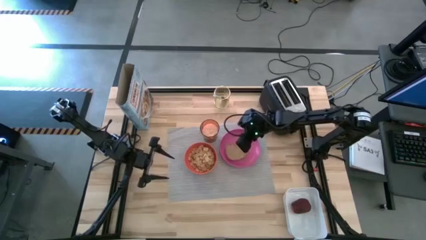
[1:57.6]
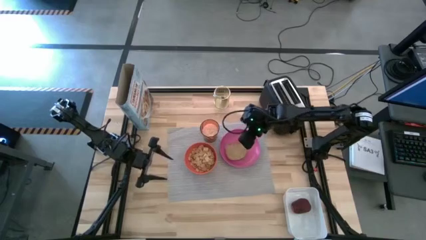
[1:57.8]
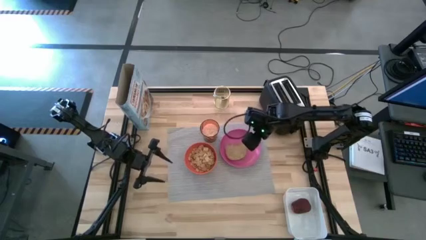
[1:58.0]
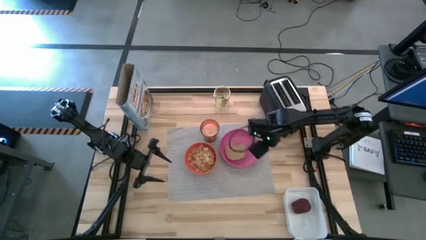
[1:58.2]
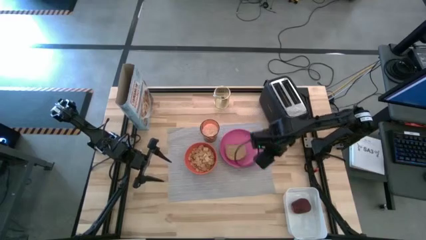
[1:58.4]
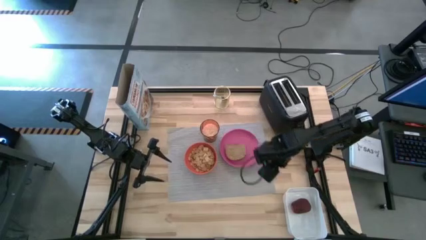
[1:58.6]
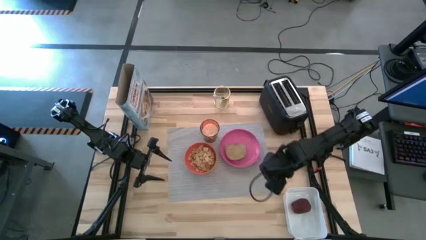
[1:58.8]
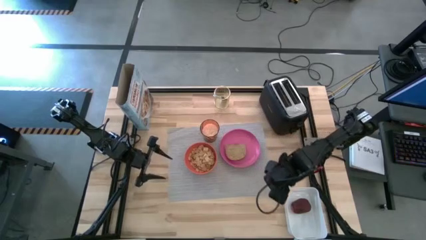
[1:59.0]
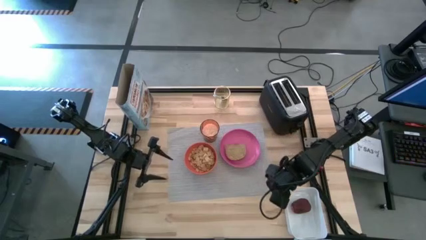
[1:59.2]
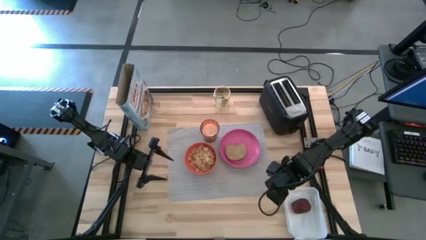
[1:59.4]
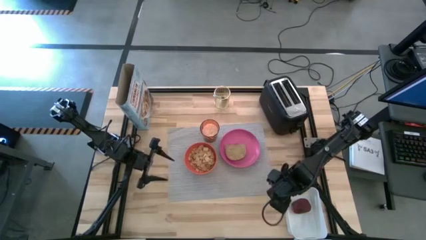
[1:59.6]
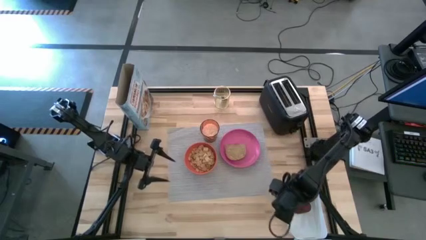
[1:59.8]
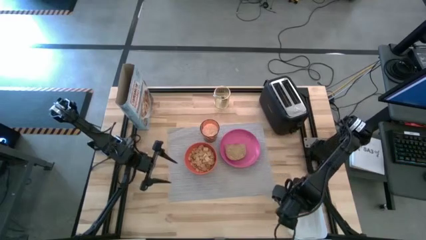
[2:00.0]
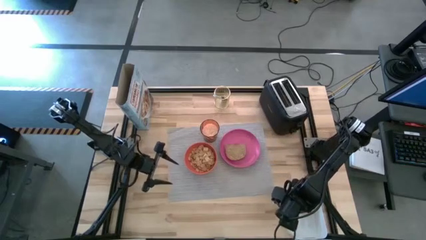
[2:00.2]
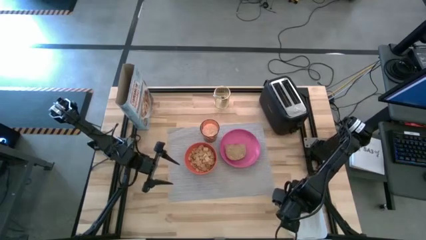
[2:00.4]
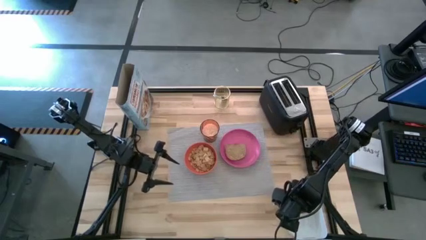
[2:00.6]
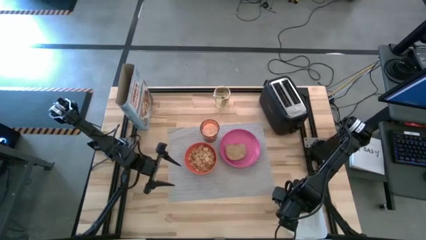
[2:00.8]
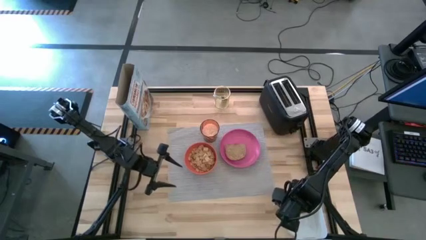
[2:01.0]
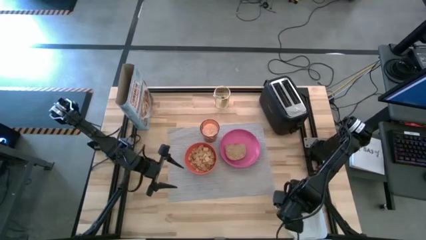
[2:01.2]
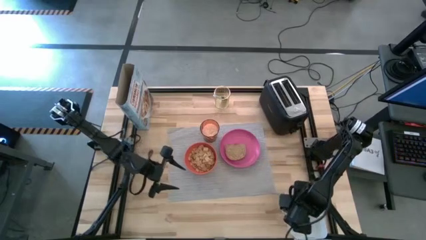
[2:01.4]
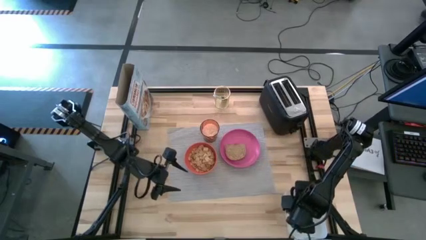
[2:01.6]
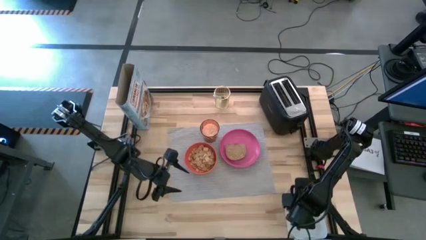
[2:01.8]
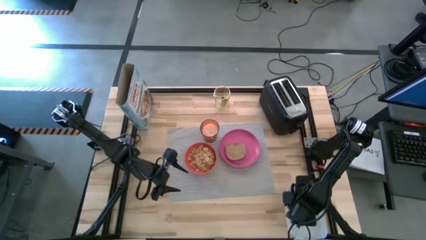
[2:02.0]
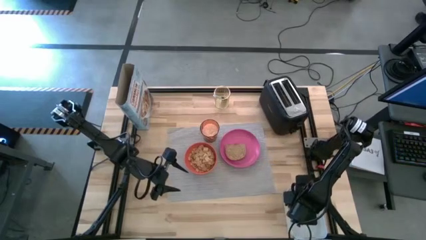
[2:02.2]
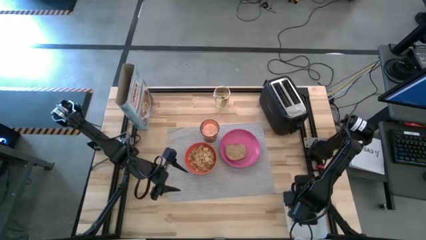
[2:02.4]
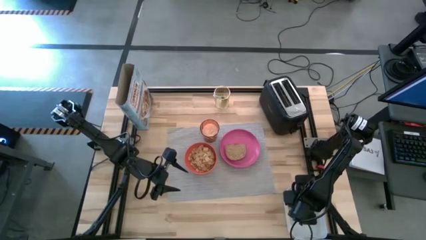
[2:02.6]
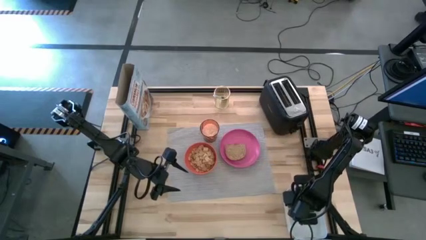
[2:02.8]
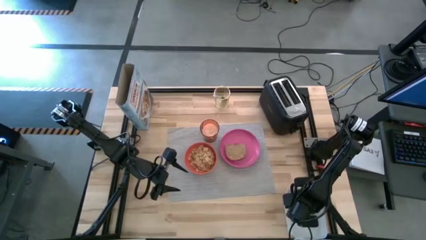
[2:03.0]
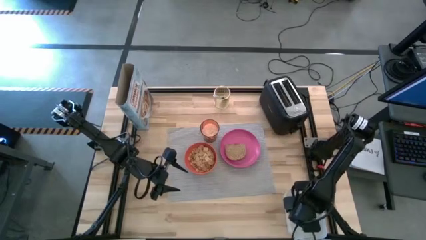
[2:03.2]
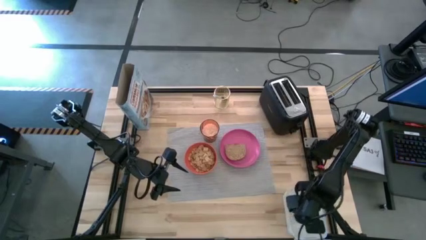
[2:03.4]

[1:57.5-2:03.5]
Task: Arrange a breakfast setting
Put the red apple on the gray table mat

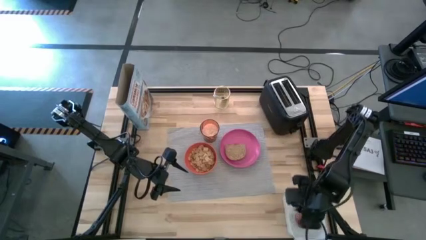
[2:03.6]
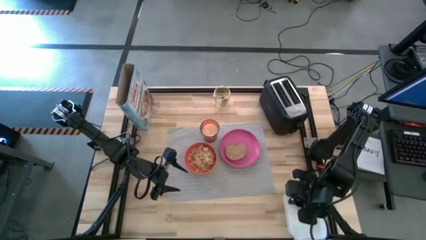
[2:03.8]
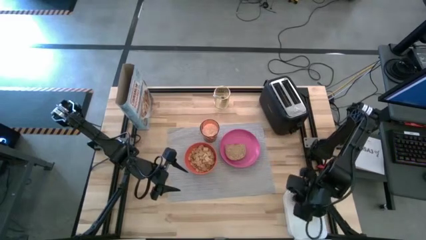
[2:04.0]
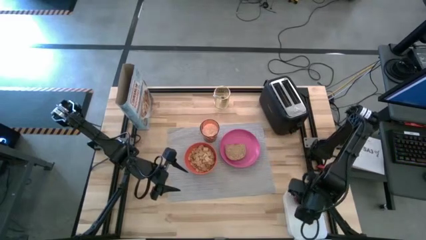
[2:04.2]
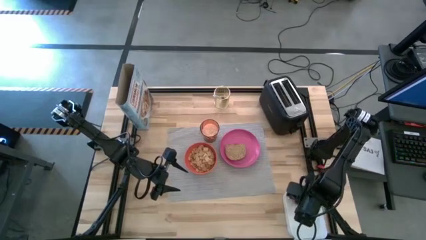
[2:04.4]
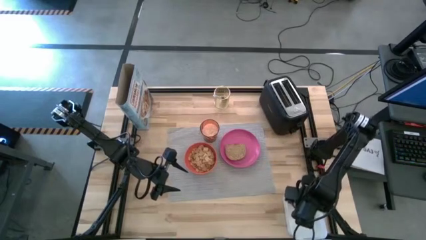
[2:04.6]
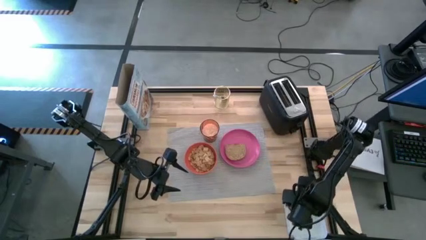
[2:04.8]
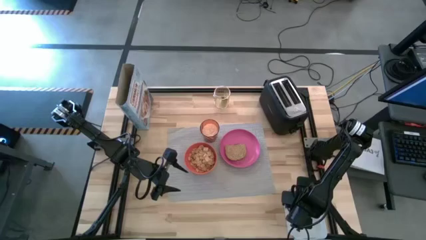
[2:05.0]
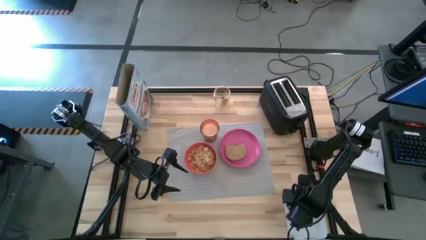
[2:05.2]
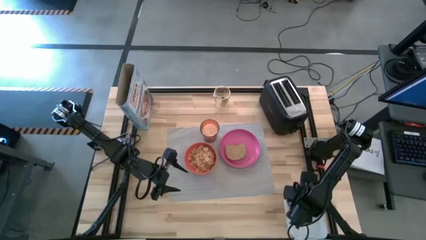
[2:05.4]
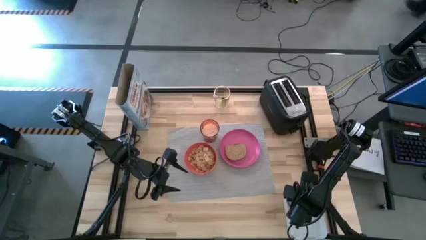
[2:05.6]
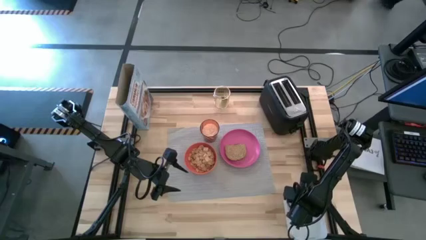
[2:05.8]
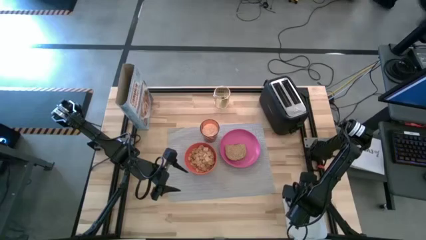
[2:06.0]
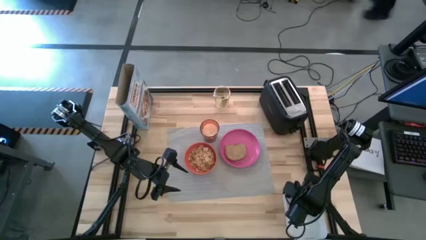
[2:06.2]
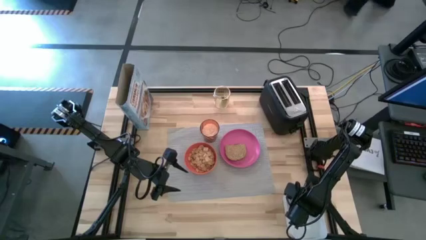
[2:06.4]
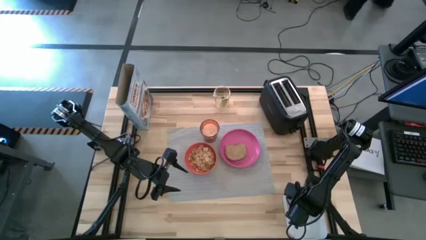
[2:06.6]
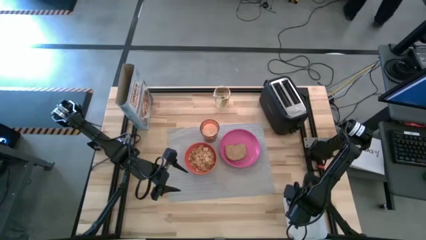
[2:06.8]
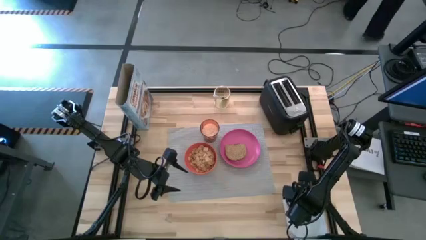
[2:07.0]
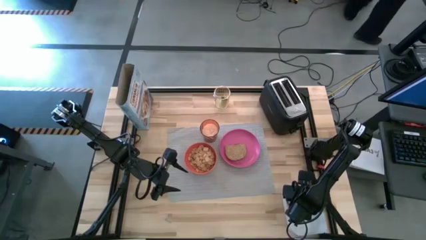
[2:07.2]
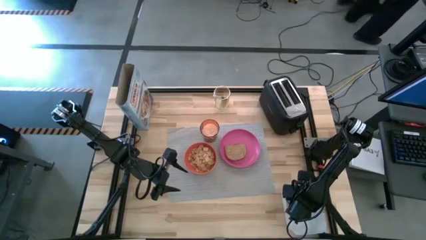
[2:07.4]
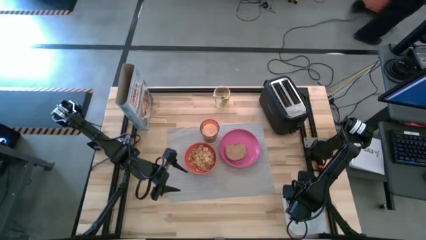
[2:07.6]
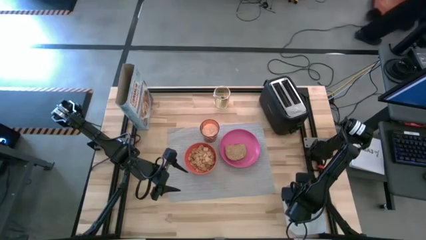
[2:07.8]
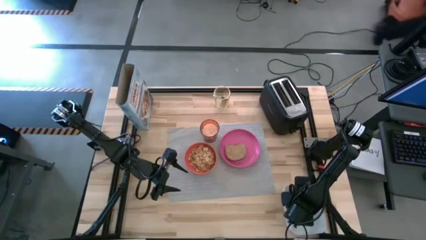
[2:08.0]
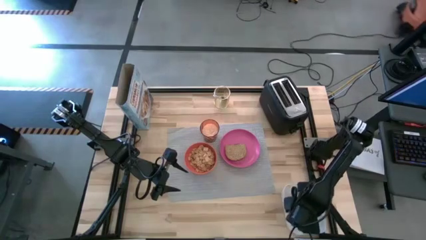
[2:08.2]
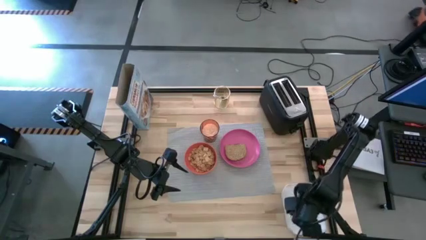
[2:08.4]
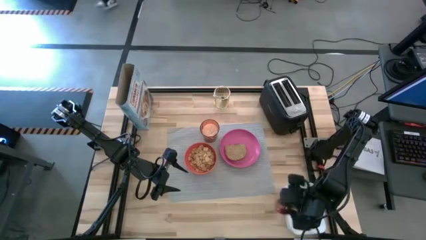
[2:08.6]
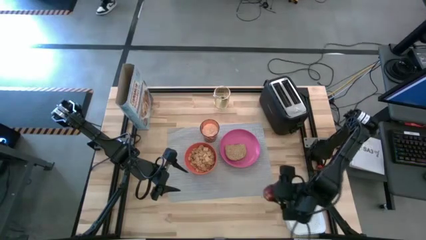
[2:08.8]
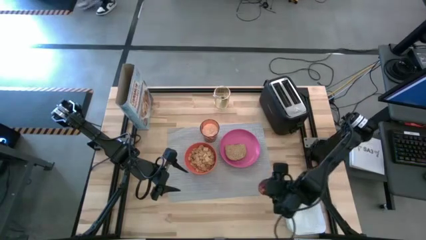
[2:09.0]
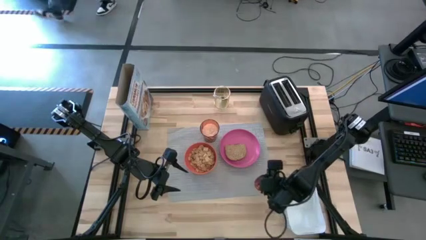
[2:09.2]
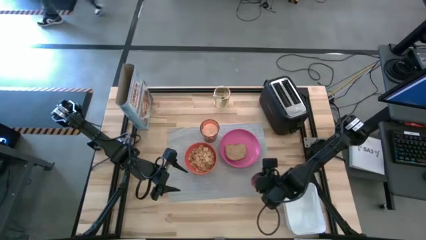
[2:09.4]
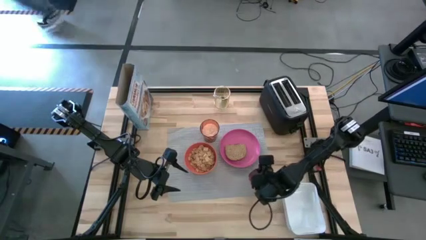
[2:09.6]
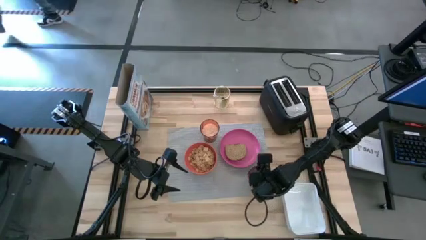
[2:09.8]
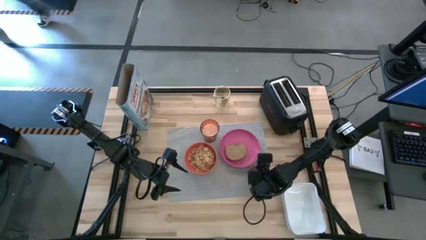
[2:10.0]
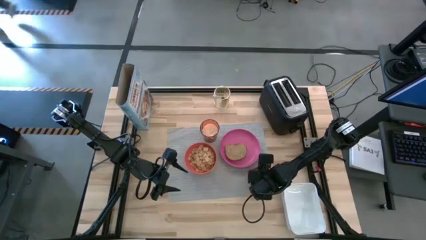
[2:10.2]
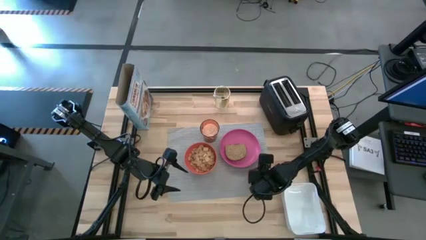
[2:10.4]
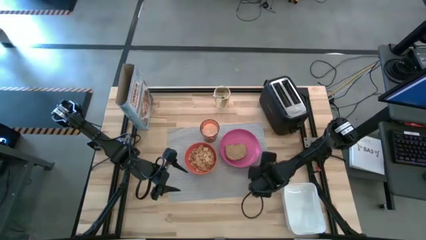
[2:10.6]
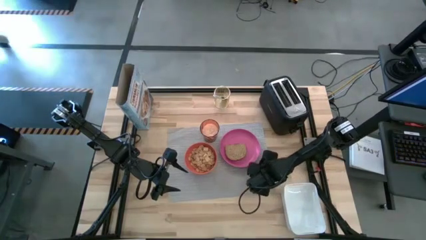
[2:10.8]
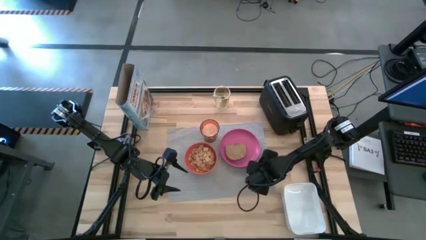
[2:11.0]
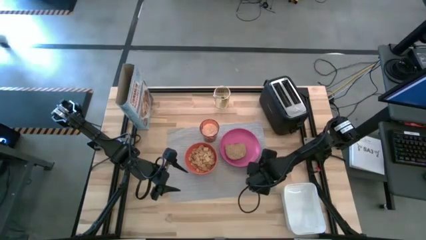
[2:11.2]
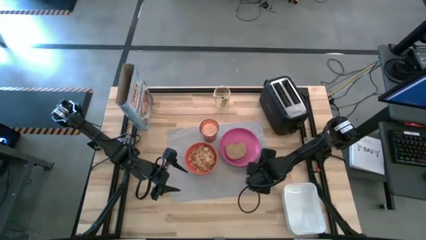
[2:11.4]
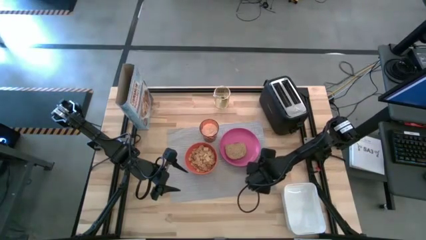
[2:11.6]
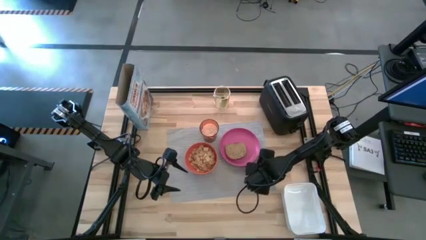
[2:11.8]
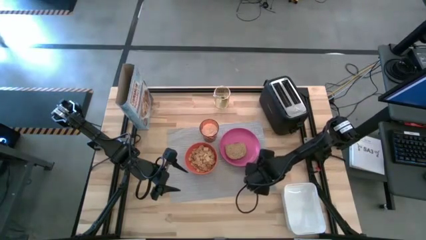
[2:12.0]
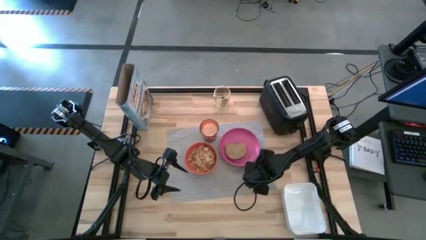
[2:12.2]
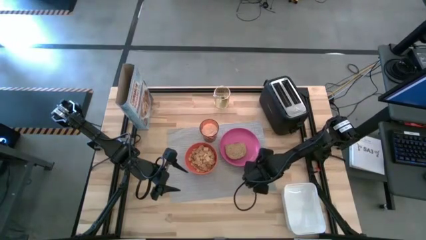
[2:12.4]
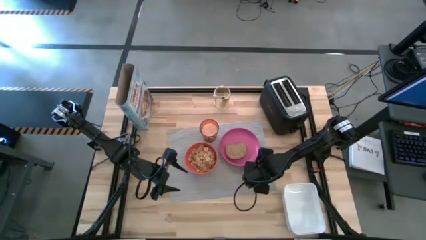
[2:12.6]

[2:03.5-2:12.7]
Put the red apple on the gray table mat
